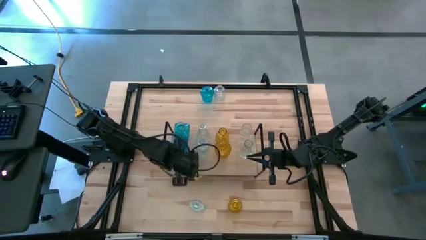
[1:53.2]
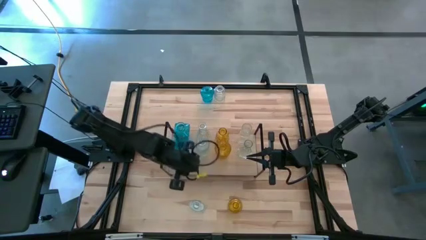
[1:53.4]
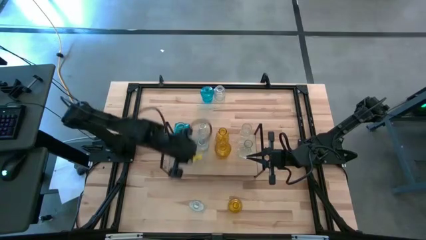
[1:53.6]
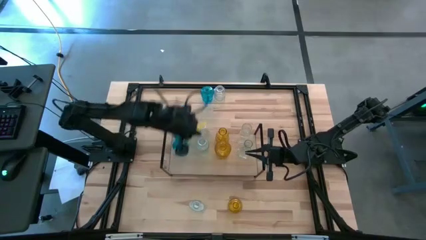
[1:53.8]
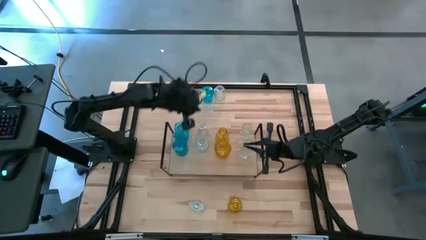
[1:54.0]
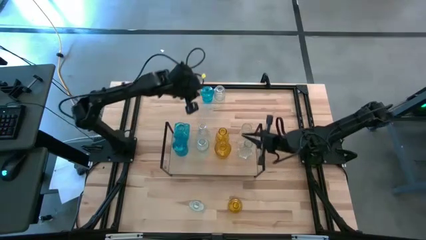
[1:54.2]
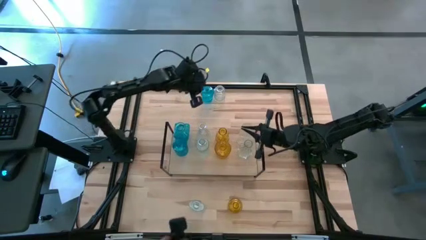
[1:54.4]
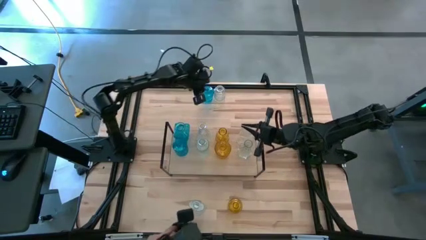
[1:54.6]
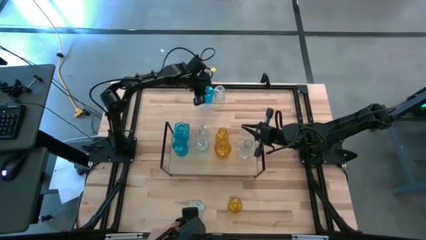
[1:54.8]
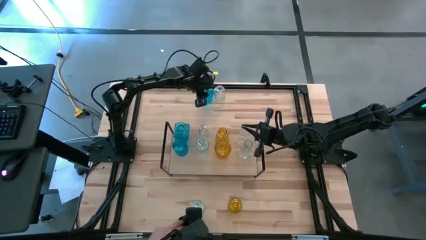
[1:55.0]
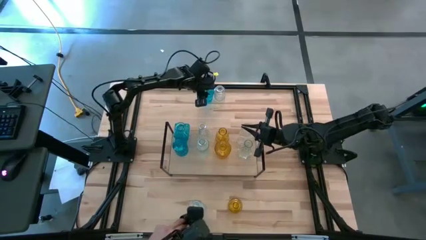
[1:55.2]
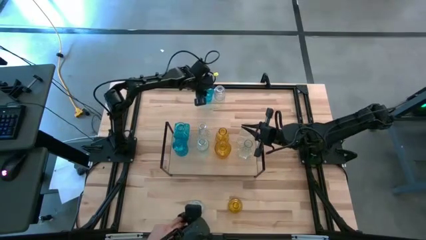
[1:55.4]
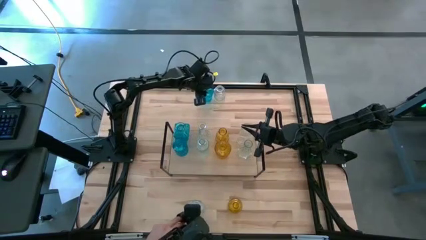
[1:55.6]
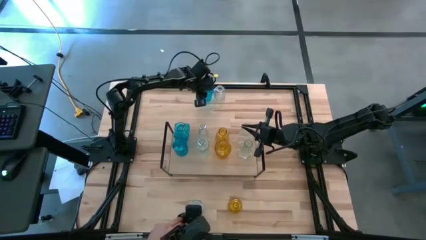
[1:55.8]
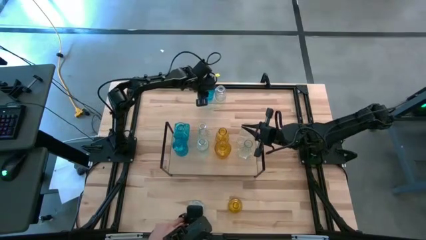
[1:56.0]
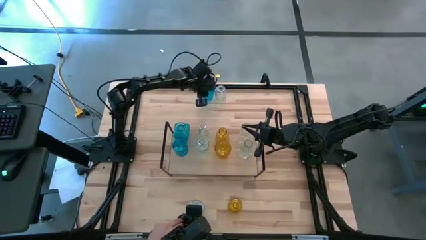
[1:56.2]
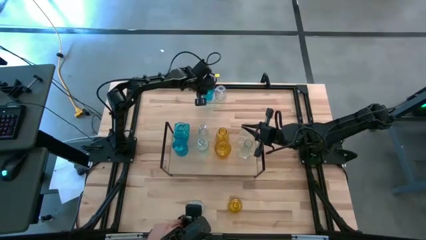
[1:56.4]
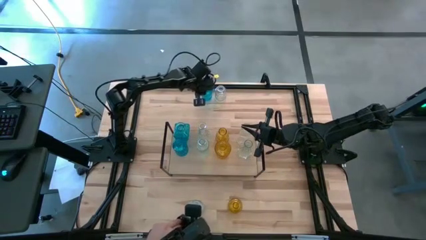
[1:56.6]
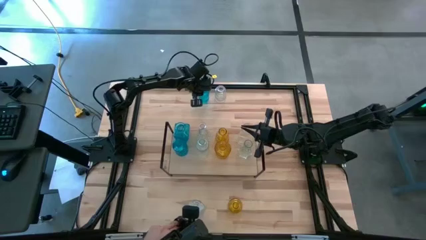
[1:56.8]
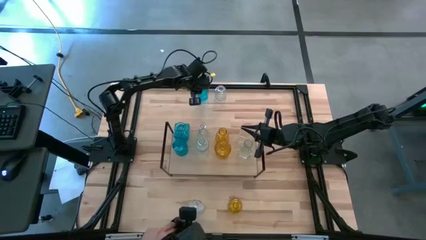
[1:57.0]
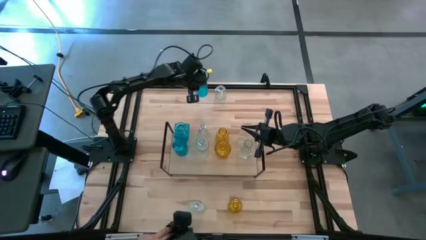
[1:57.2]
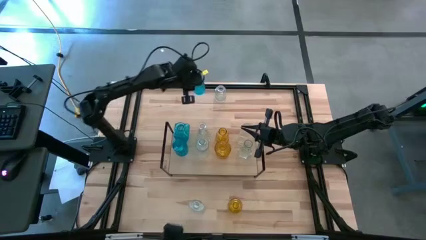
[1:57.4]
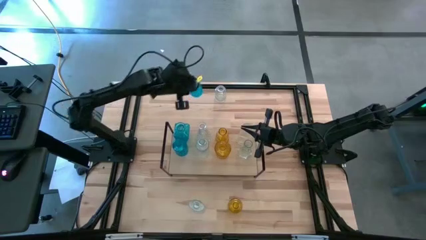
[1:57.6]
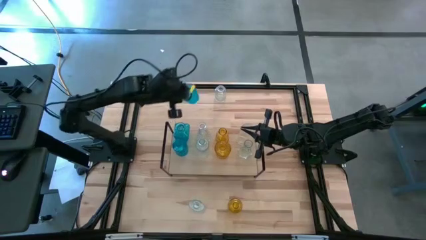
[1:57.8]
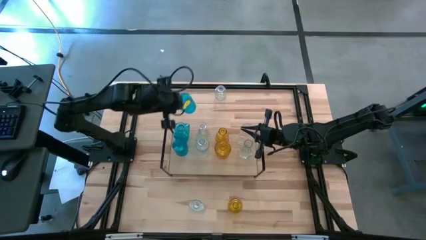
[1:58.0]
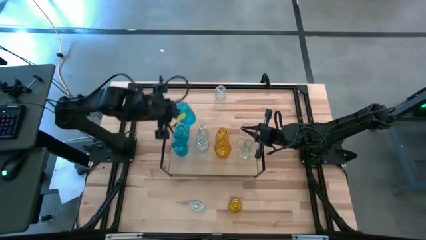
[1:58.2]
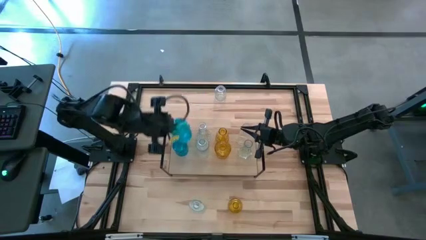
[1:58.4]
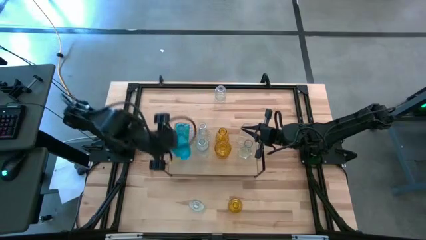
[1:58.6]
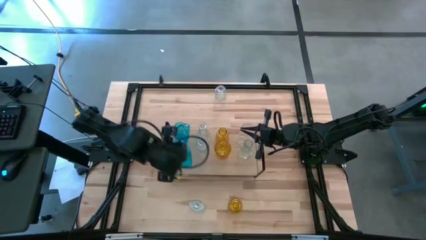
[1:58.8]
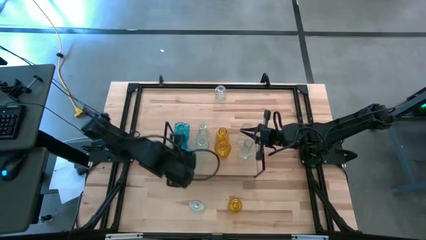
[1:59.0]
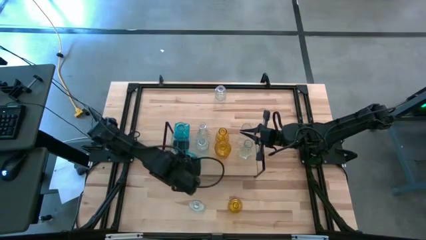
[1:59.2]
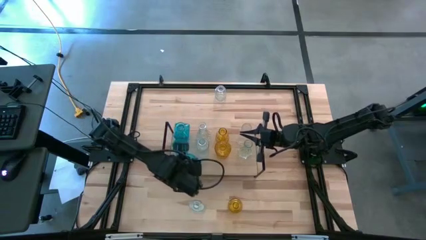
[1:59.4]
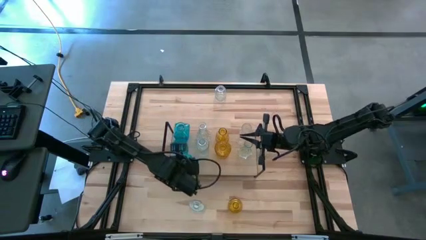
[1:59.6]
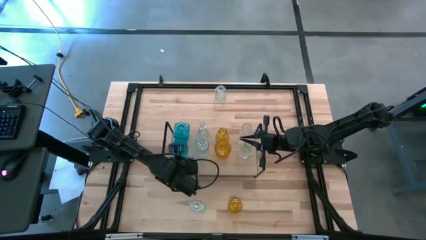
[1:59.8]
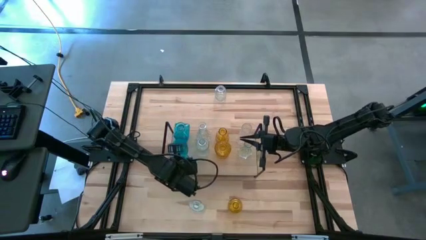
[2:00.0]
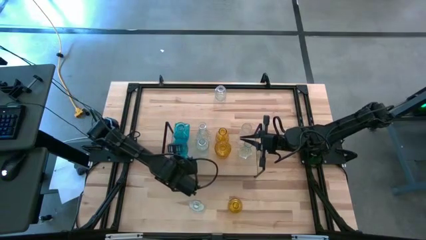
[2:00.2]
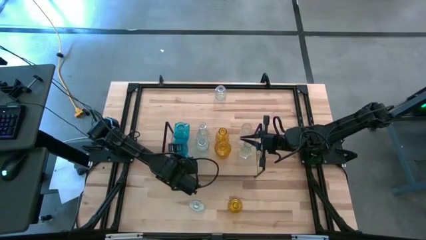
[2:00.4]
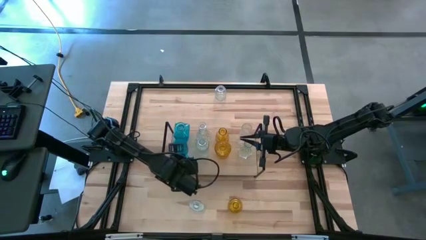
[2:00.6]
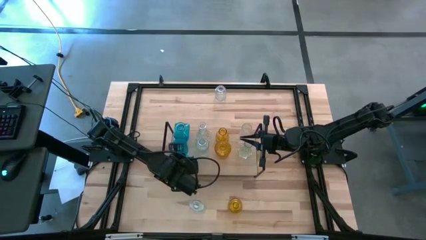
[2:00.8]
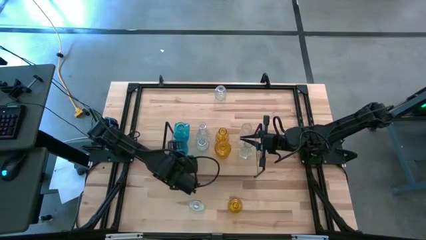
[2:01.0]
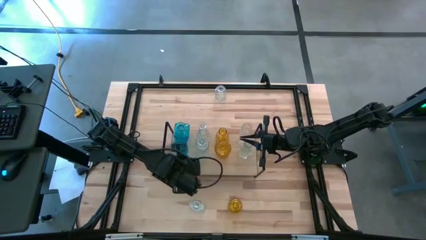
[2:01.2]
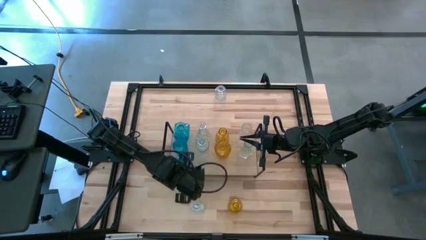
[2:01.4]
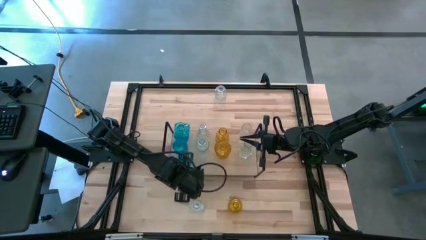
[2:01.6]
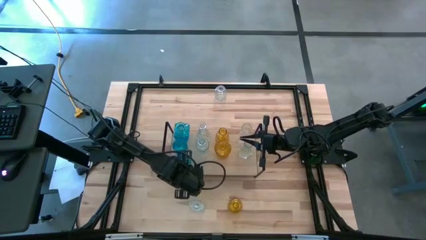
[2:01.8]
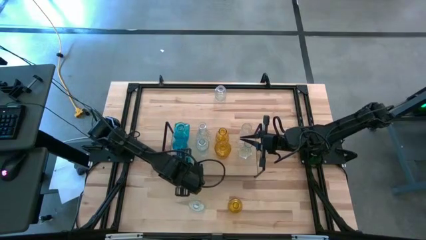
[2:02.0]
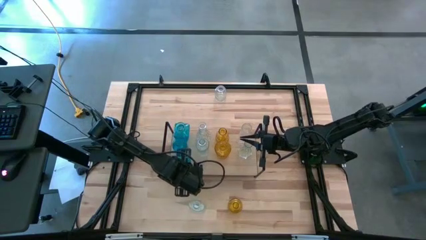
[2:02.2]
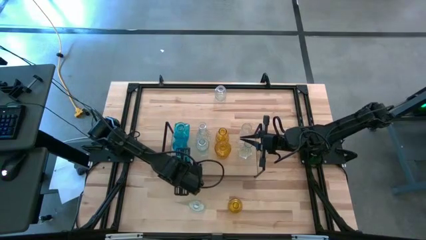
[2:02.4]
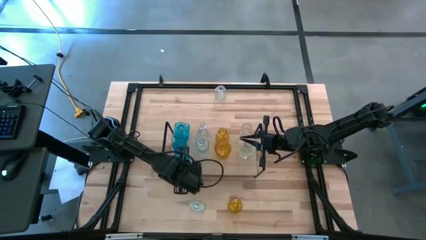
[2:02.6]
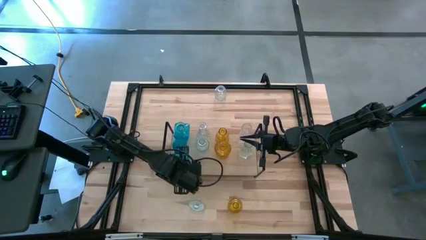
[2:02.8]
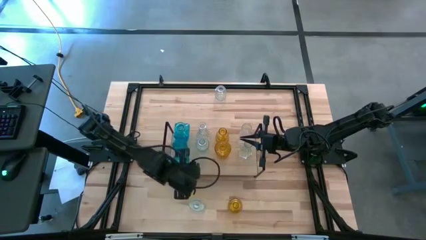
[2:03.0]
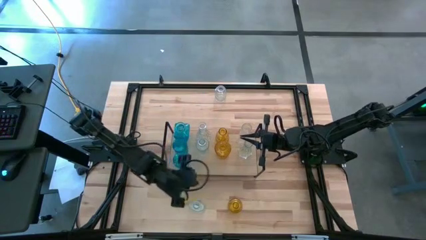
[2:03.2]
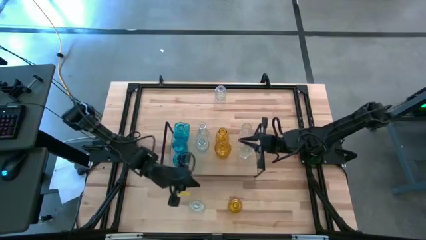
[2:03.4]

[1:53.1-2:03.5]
Task: sort vases onto shelf
Put the blue vase on the shelf

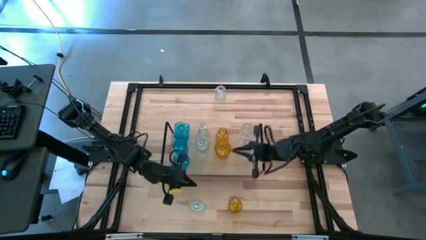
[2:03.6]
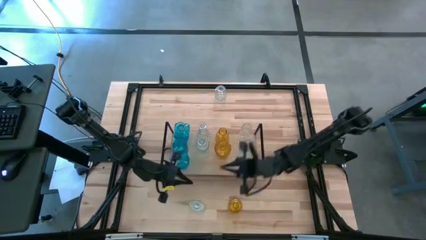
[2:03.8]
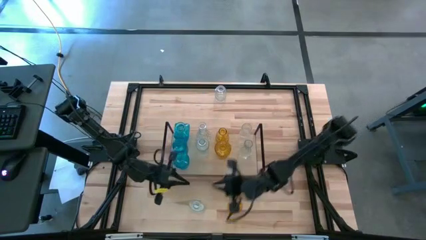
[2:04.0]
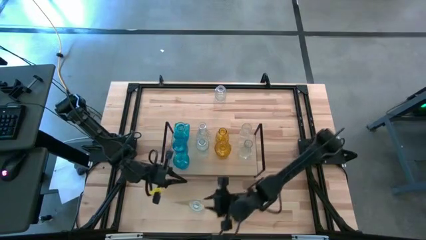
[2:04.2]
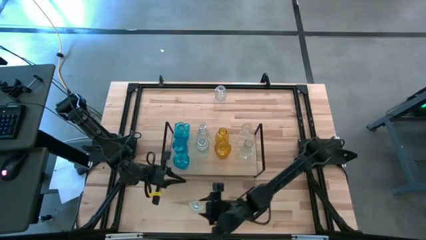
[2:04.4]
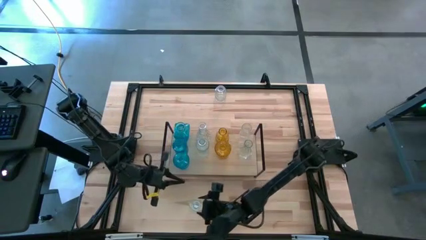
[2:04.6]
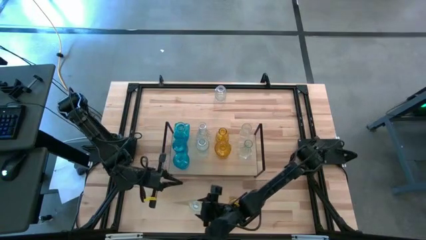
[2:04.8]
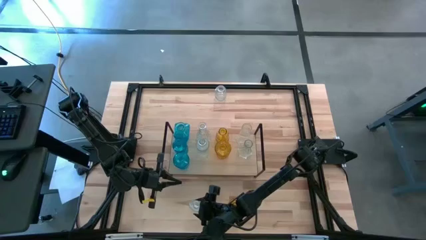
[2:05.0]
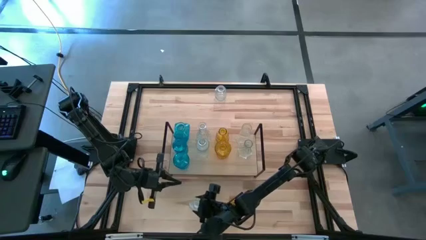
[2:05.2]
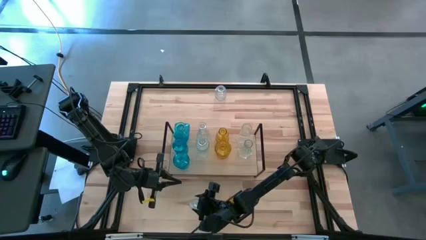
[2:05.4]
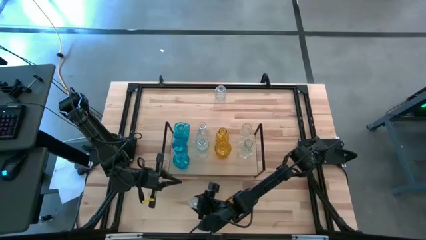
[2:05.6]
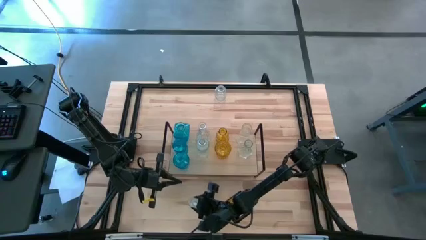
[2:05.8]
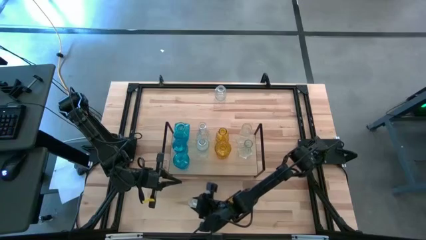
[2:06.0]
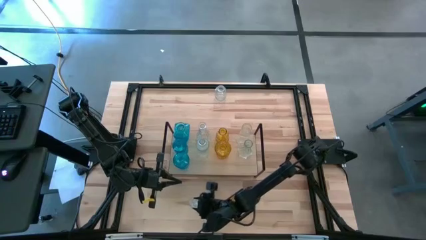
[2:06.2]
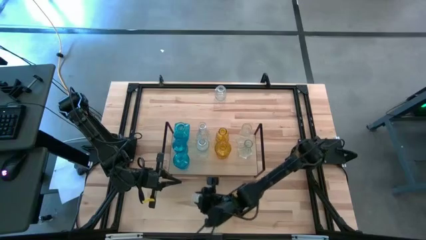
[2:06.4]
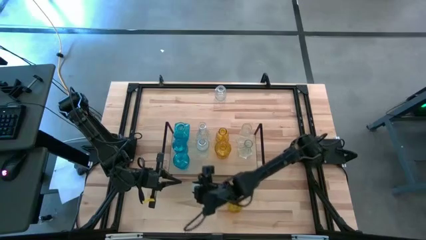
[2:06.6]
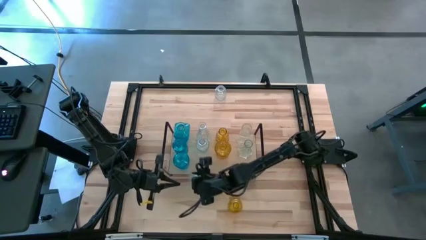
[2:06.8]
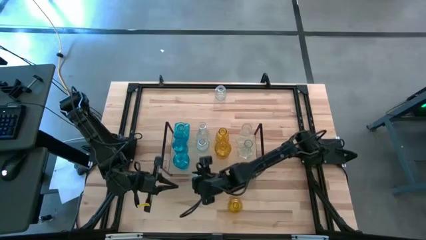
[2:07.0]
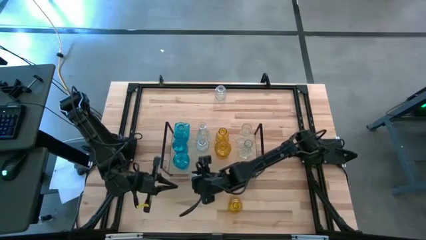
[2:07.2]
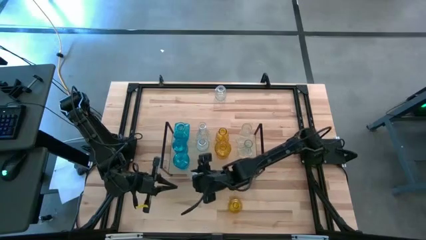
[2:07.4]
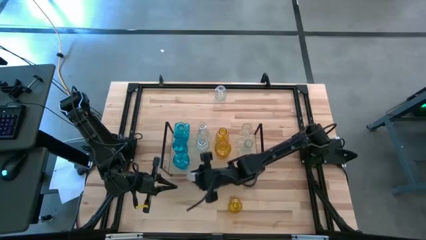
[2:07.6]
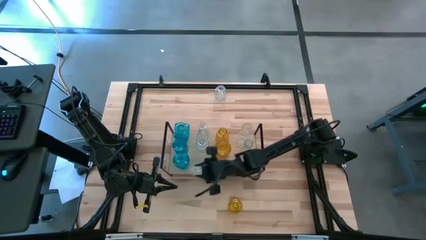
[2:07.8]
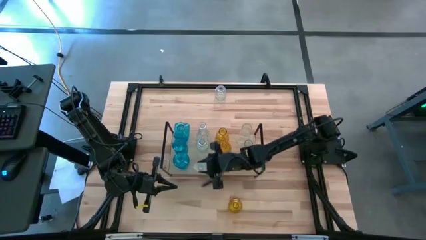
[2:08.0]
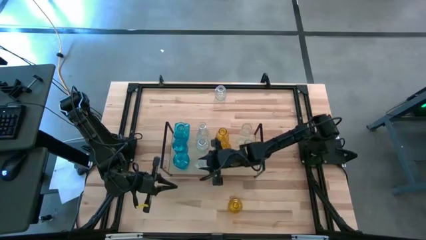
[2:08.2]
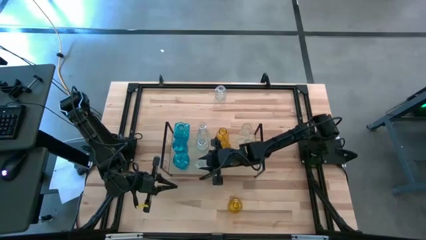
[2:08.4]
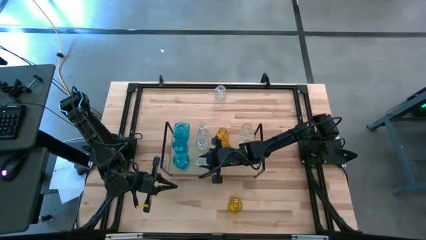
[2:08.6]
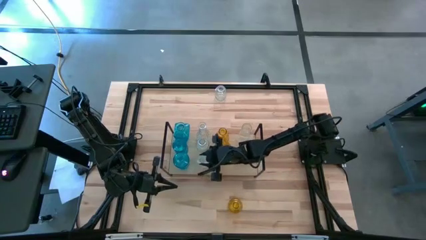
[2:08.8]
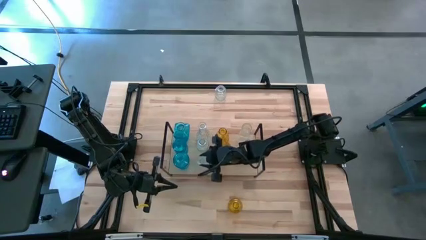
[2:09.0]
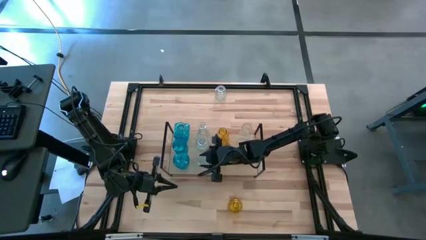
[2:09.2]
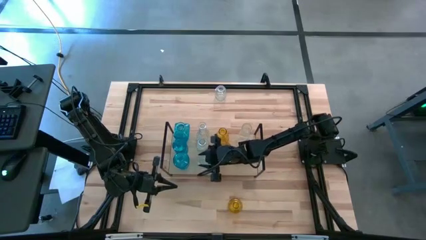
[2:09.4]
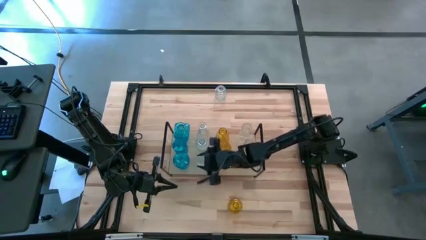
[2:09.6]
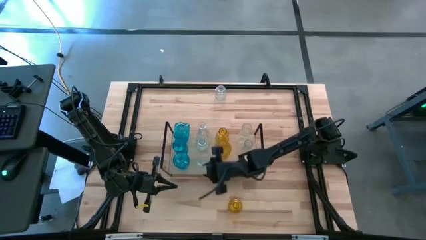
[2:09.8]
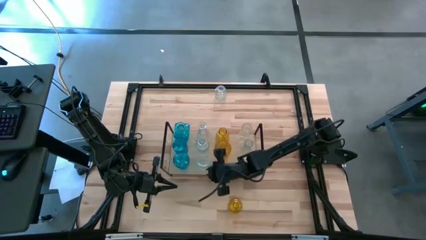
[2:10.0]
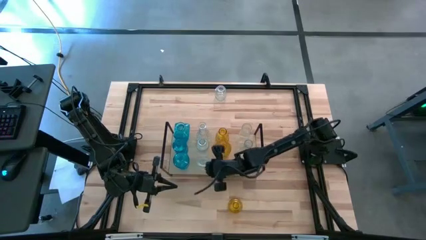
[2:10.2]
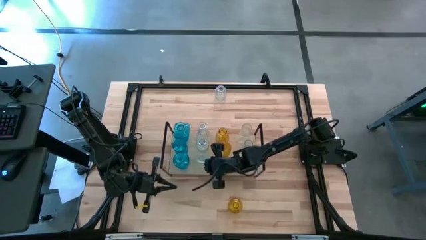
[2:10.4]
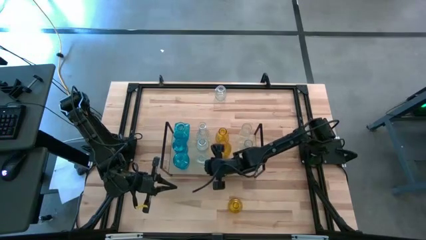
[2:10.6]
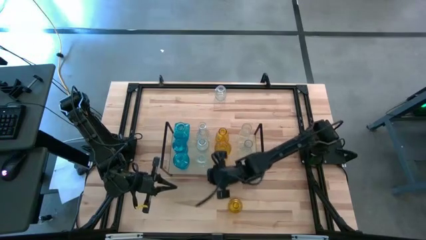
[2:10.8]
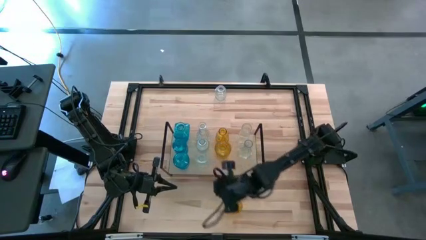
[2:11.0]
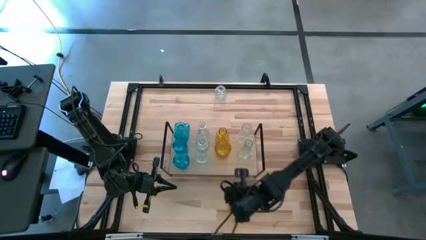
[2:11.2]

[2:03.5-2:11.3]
Put the bottom transparent vase on the shelf
